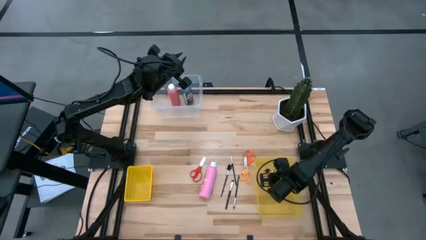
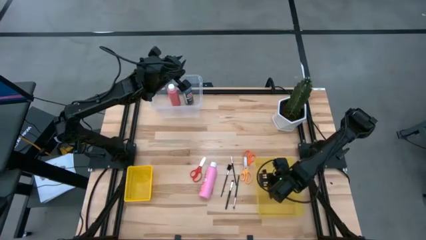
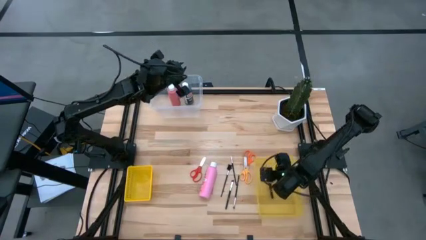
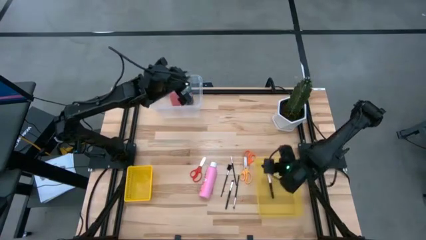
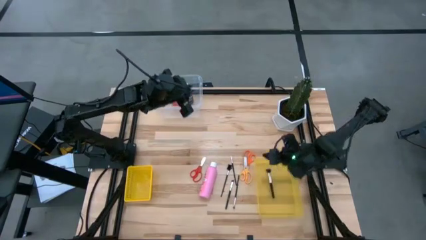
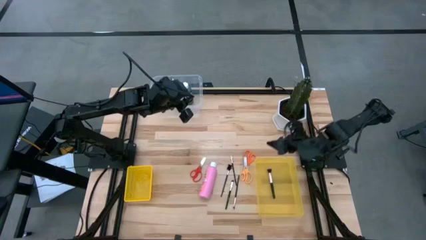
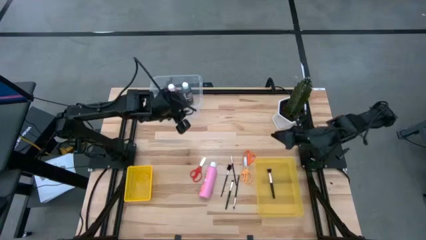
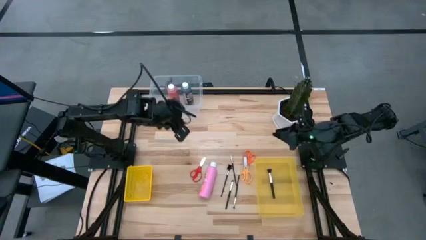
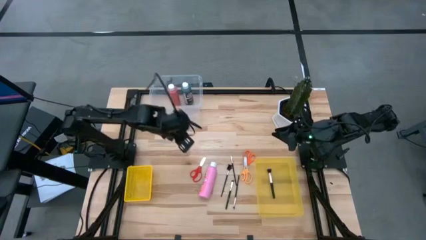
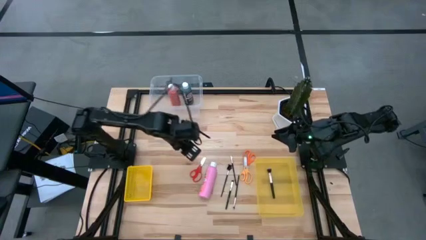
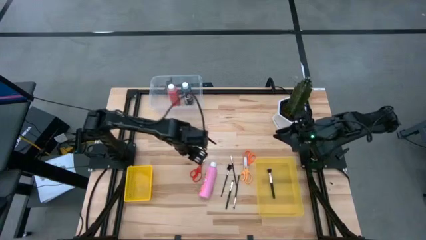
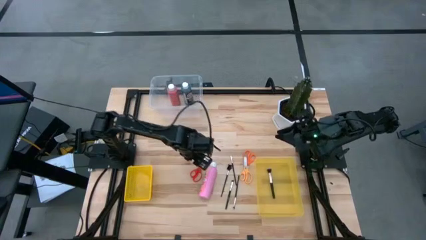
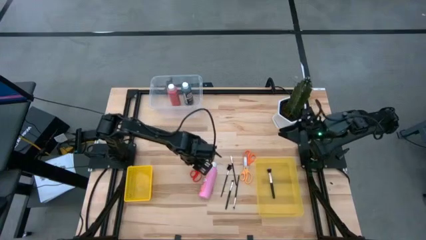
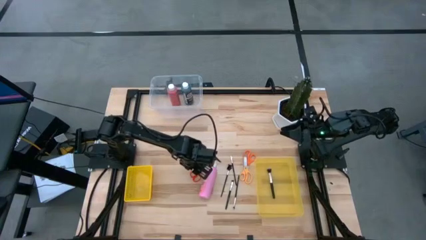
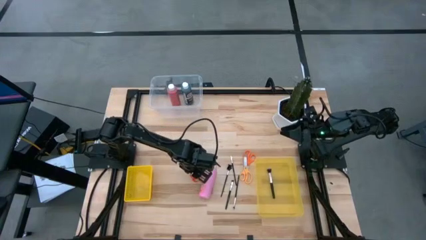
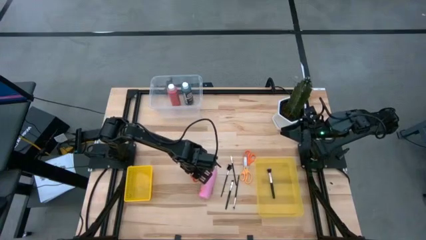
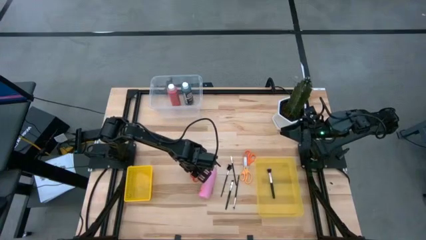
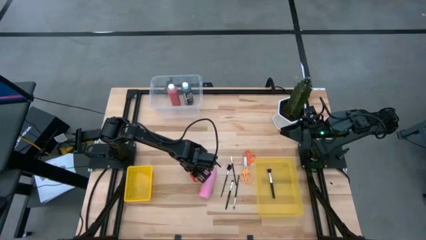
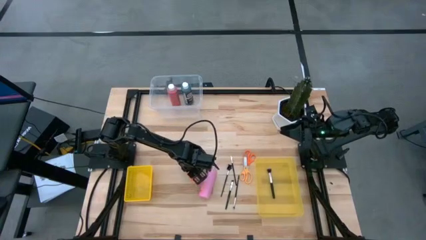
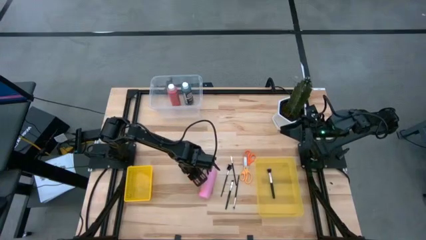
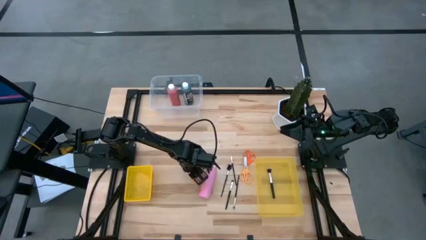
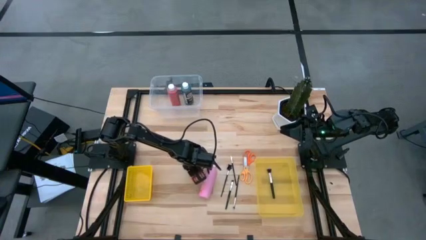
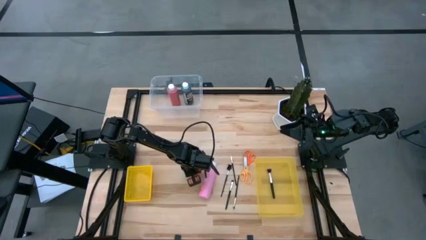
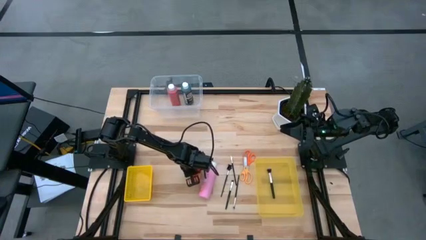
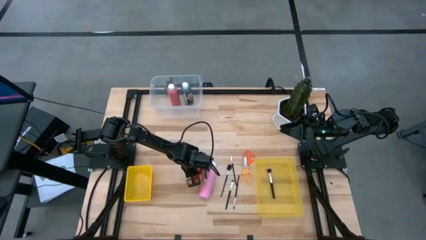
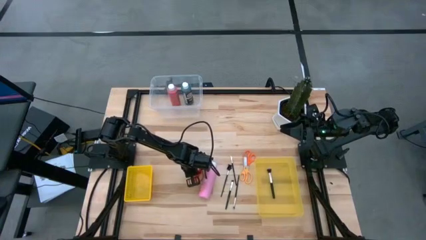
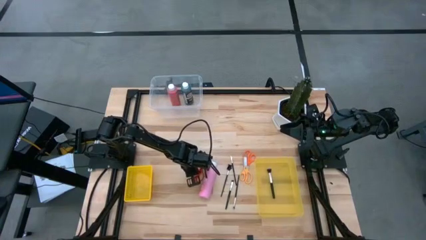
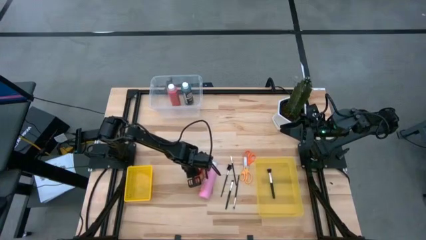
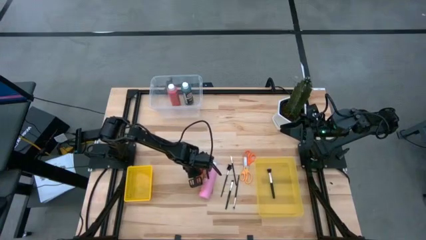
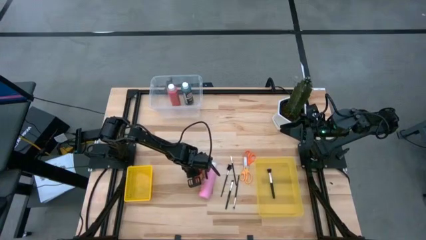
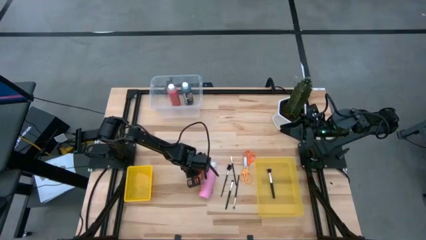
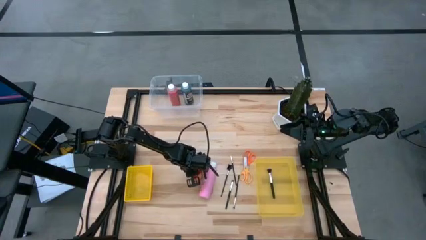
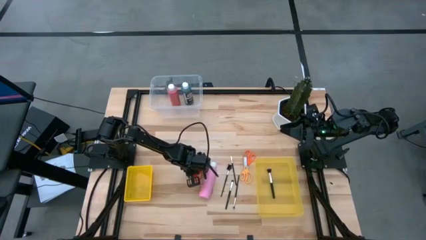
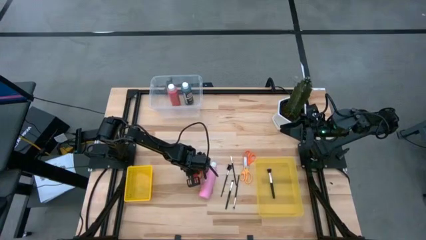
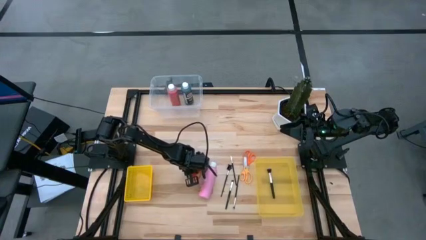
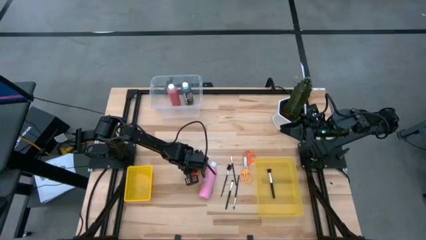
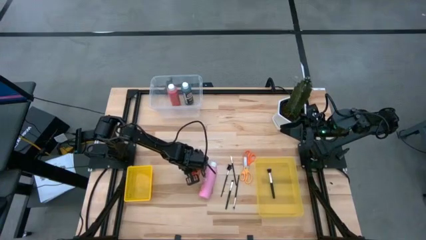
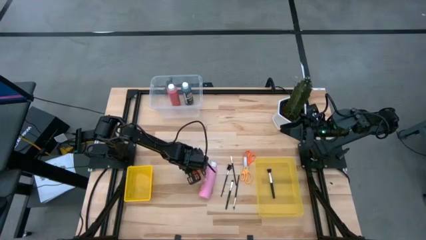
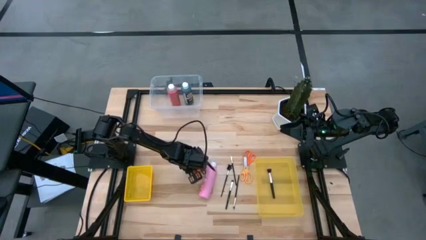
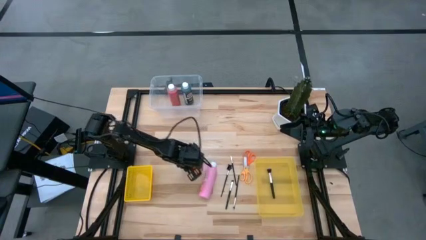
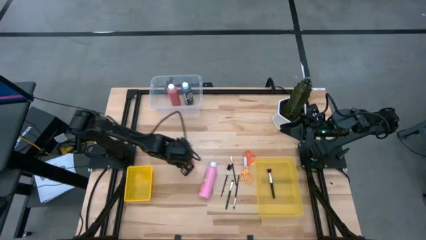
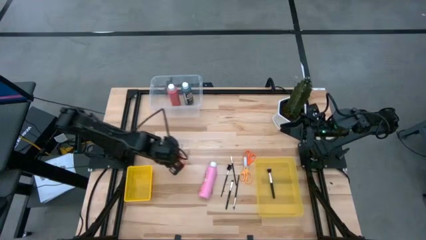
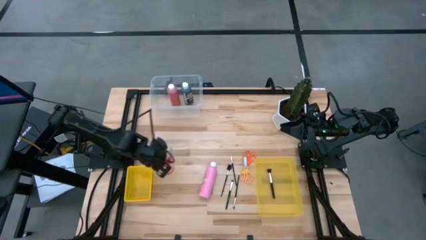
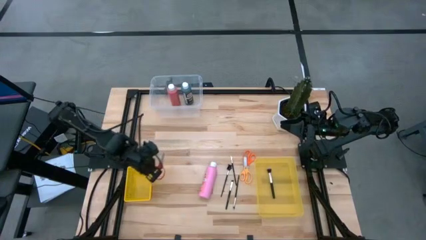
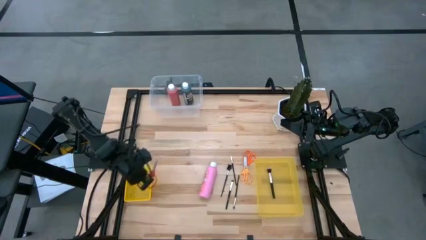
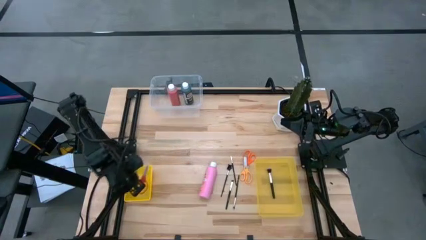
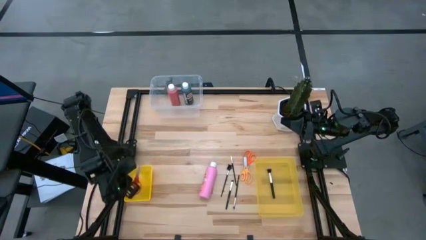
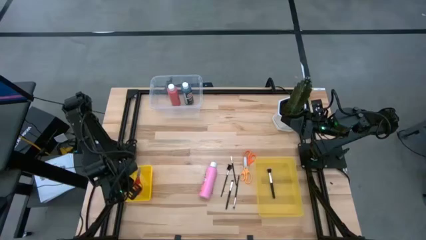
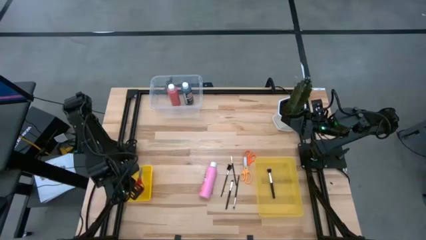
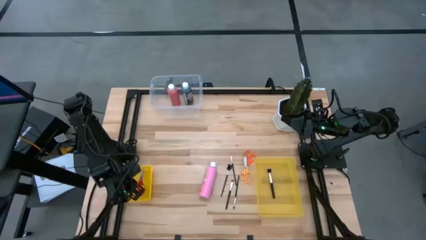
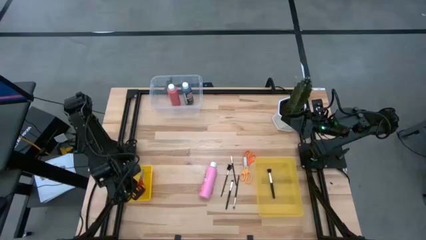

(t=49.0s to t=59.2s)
Task: Pick & Place Paint Supplies
Put the red scissors into the yellow basket

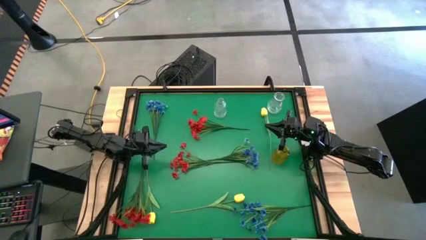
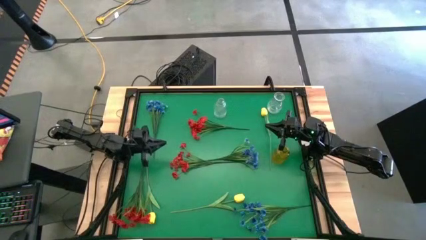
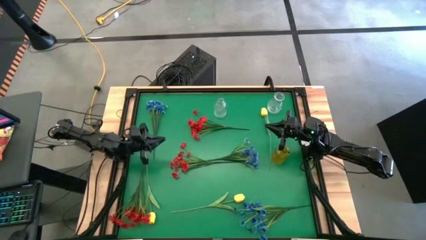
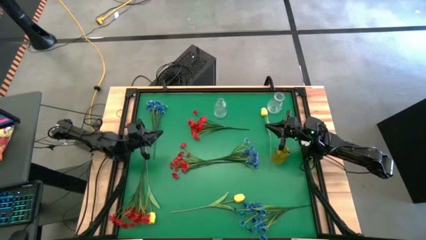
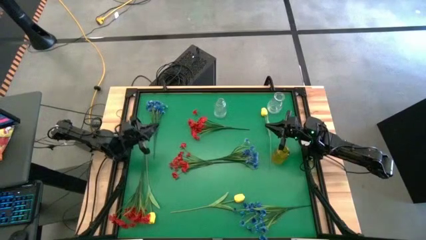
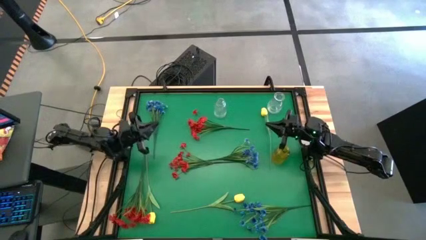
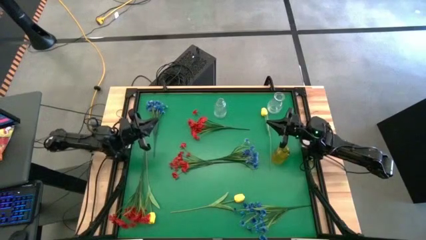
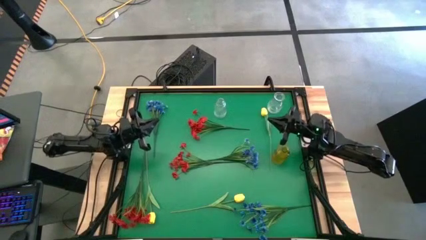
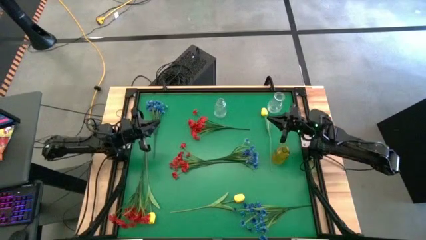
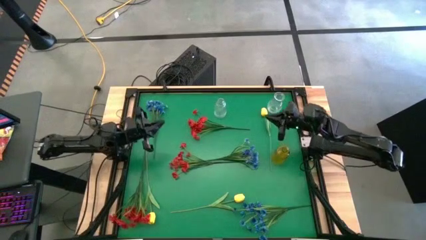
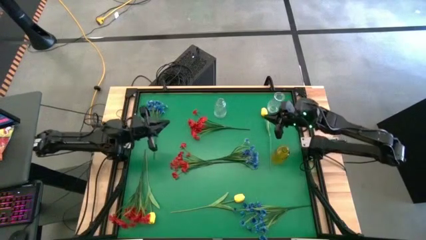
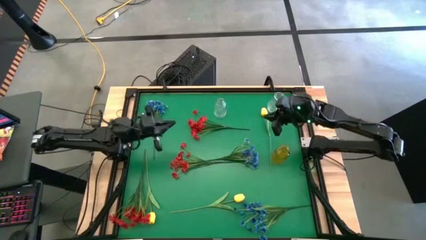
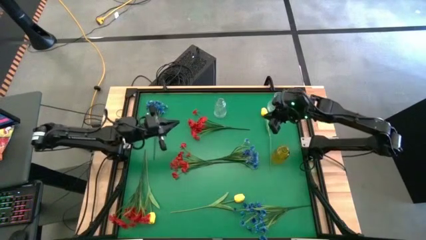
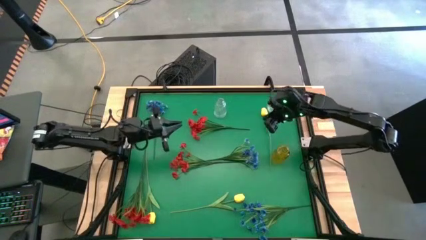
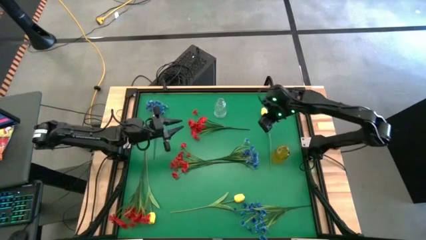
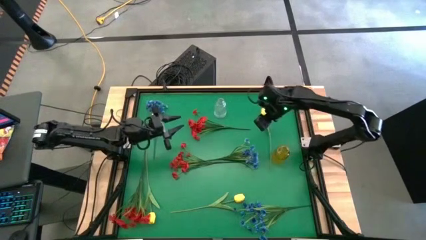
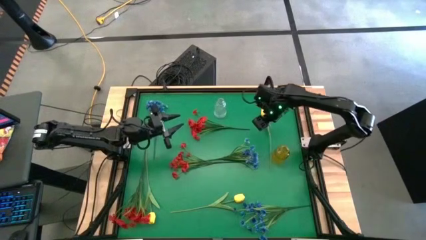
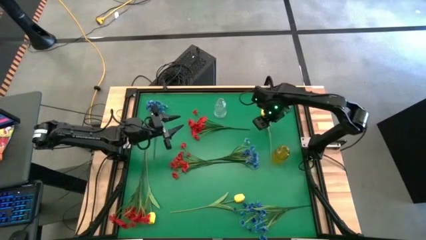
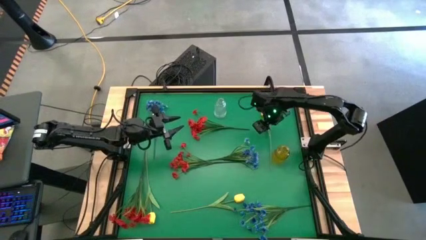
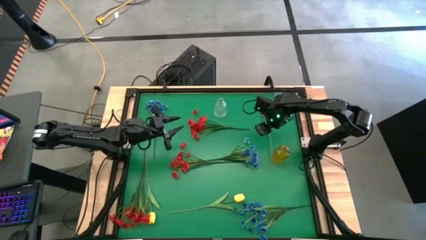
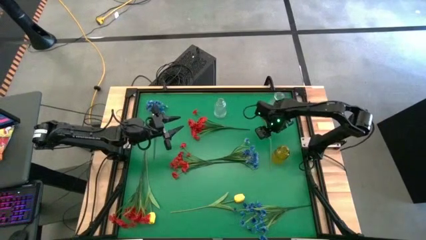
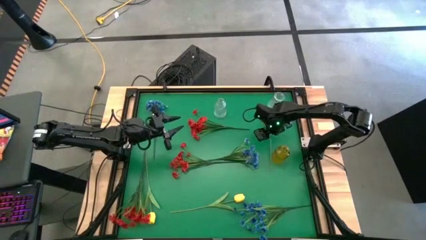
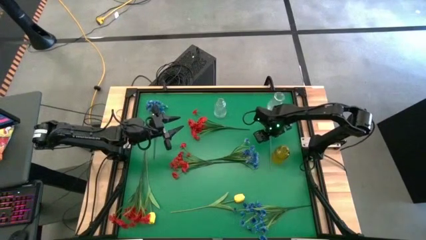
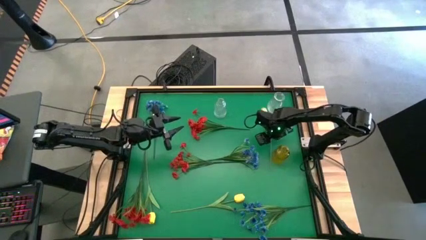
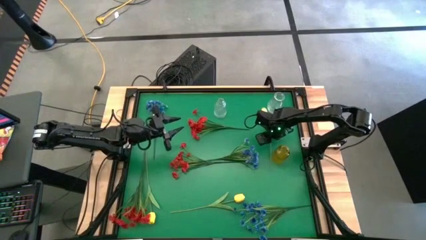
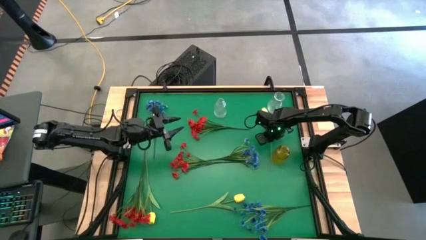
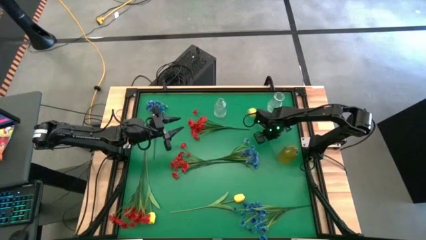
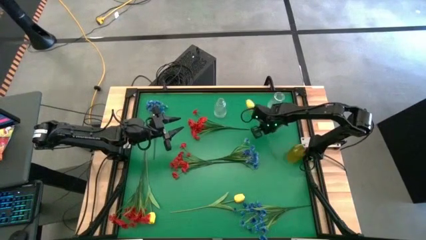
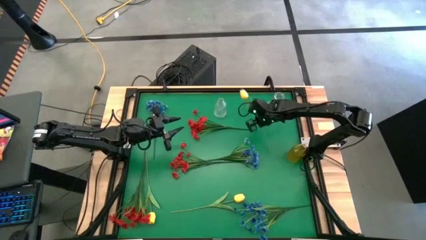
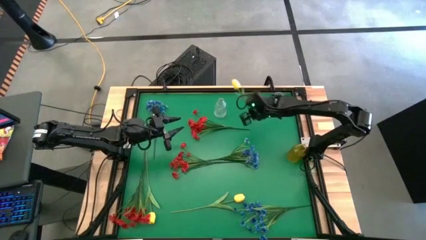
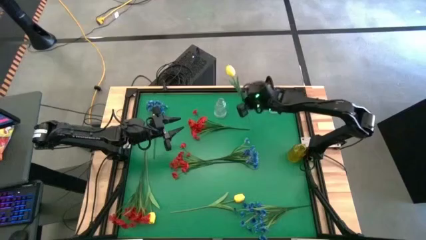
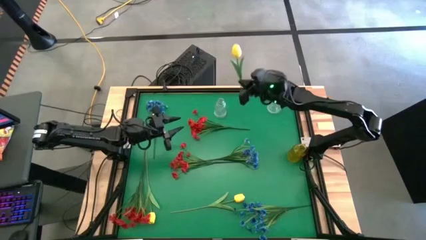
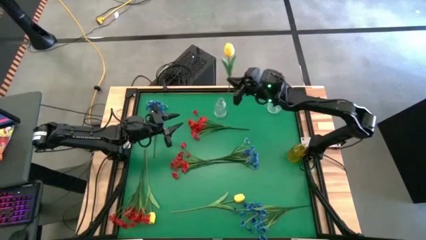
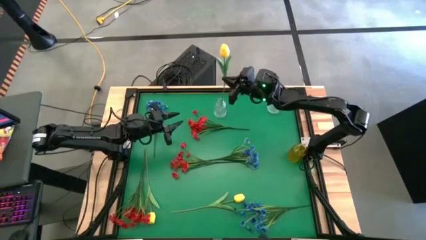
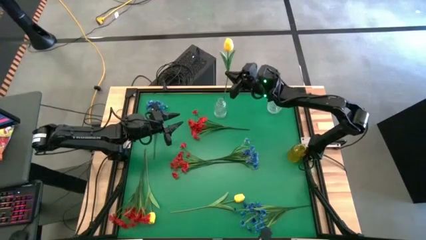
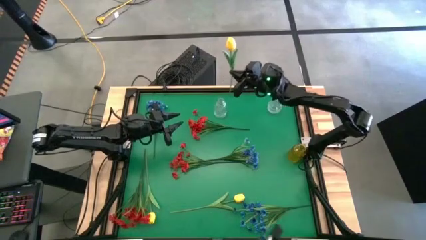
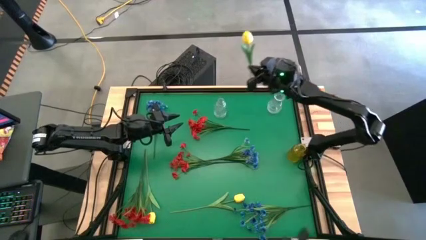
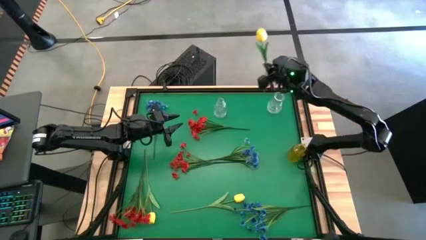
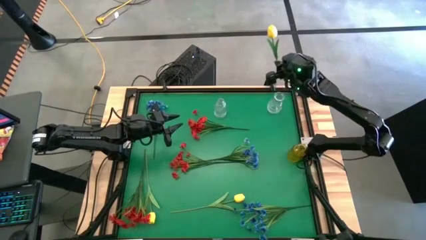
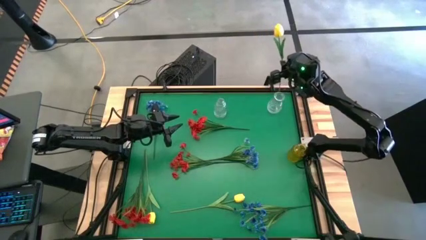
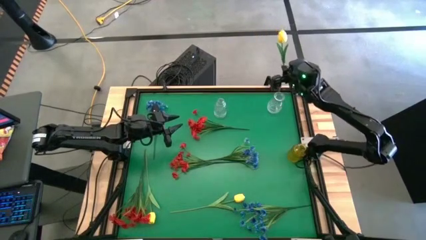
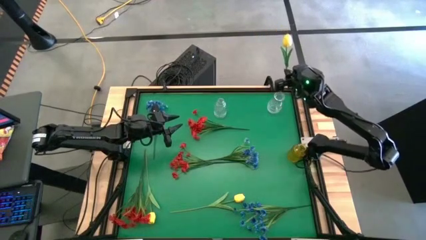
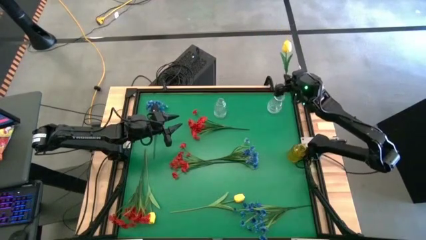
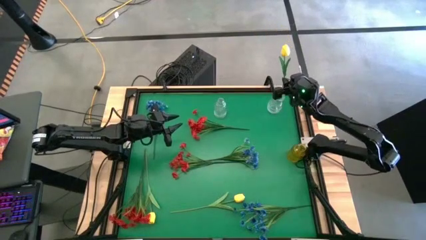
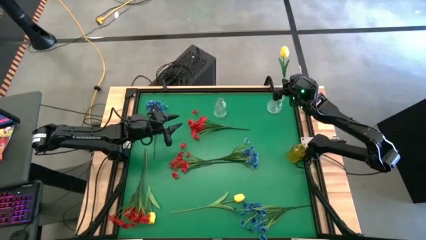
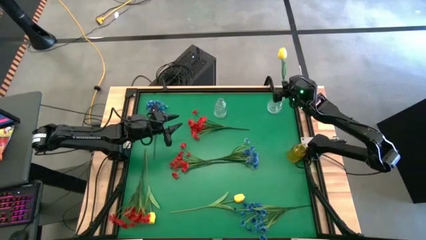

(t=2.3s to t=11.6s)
Task: Sort flowers into vase by color
Put the top yellow flower into the right white transparent vase
